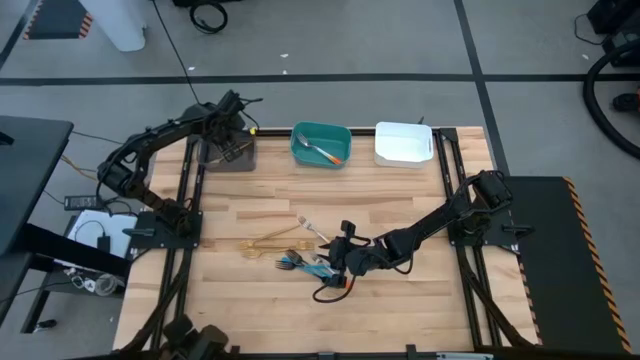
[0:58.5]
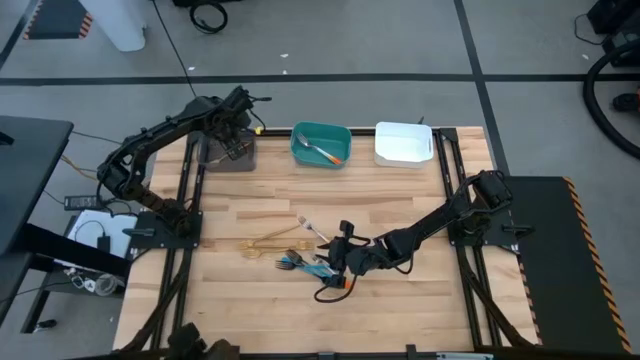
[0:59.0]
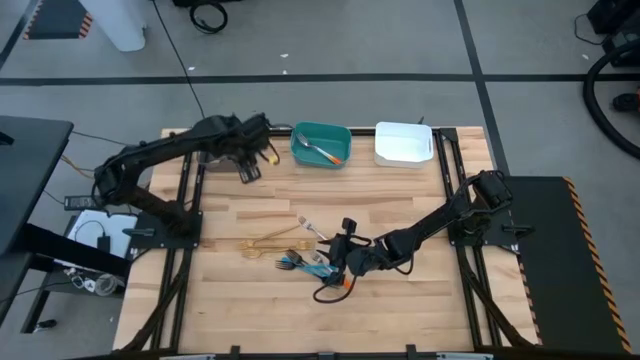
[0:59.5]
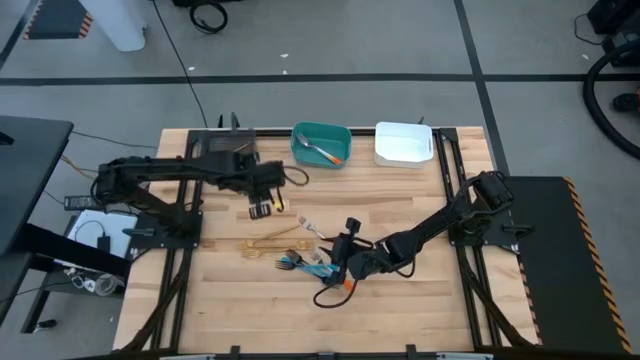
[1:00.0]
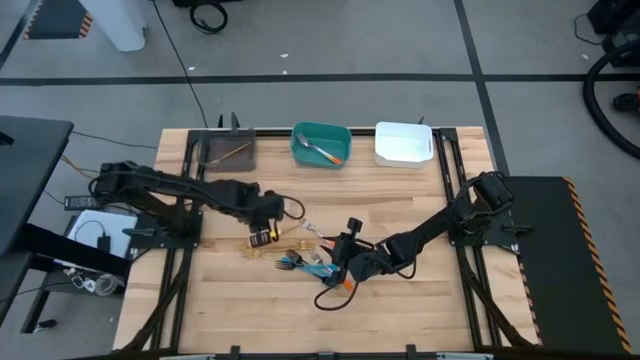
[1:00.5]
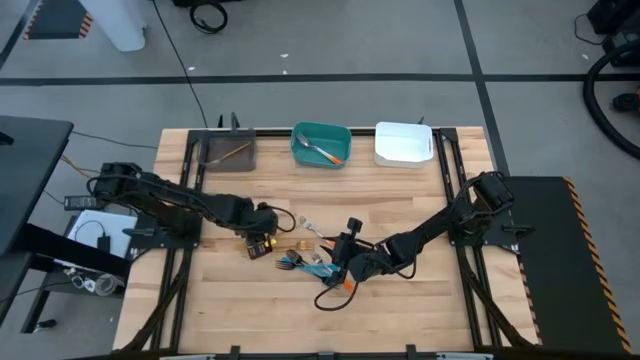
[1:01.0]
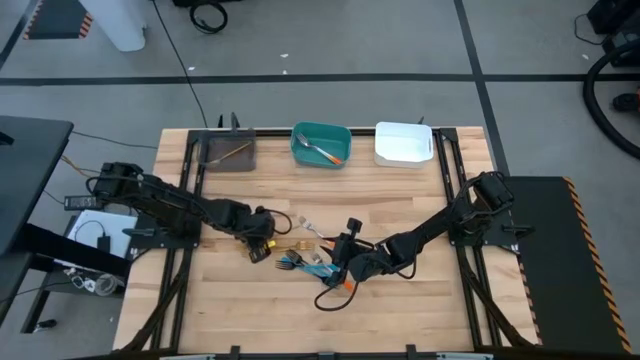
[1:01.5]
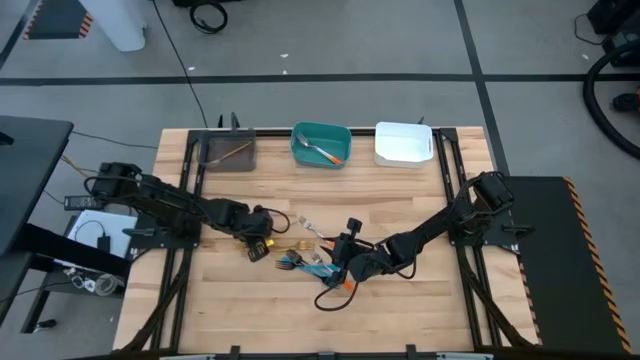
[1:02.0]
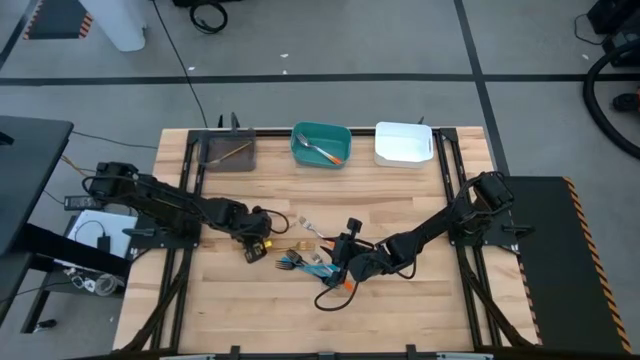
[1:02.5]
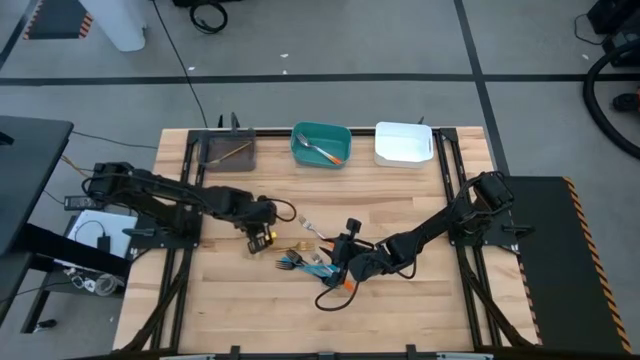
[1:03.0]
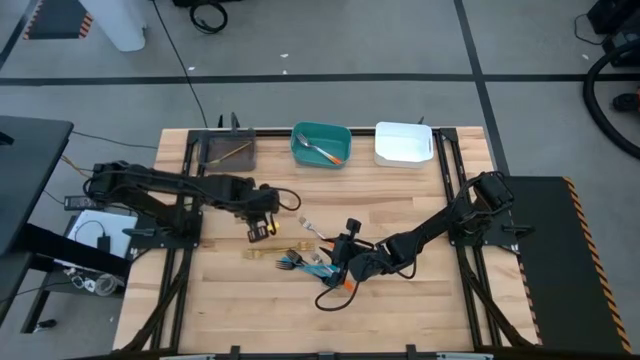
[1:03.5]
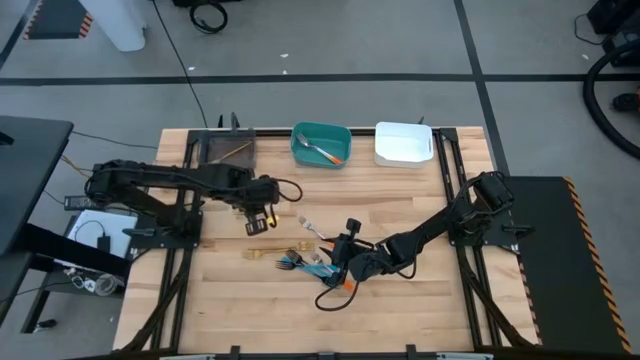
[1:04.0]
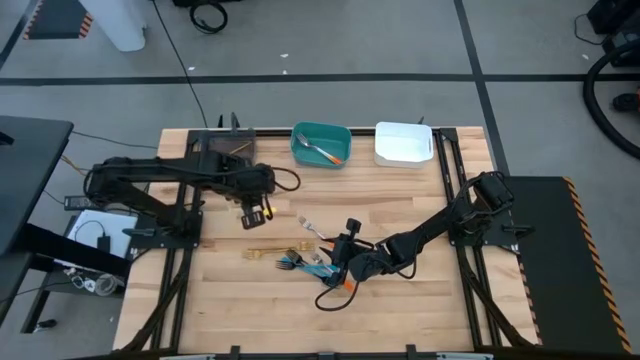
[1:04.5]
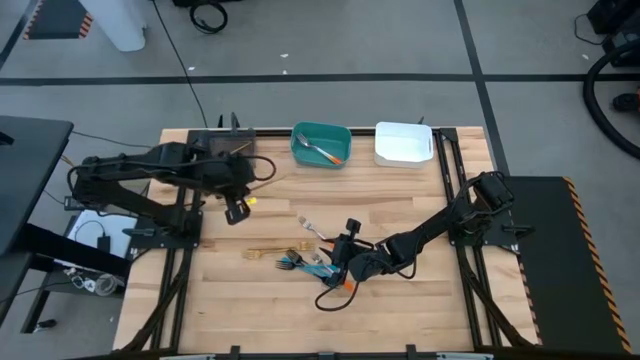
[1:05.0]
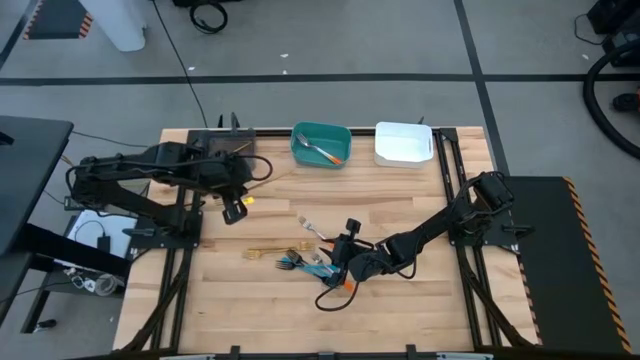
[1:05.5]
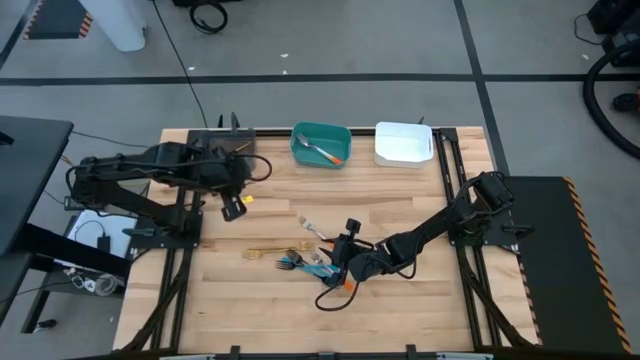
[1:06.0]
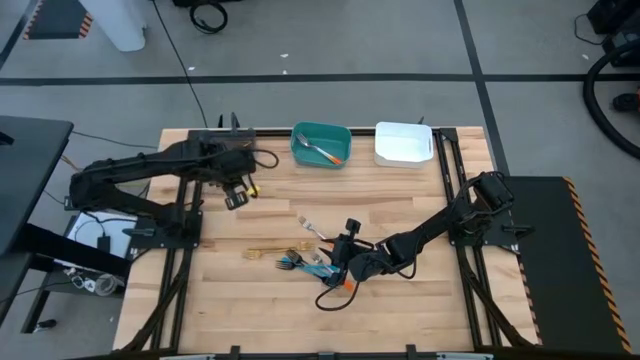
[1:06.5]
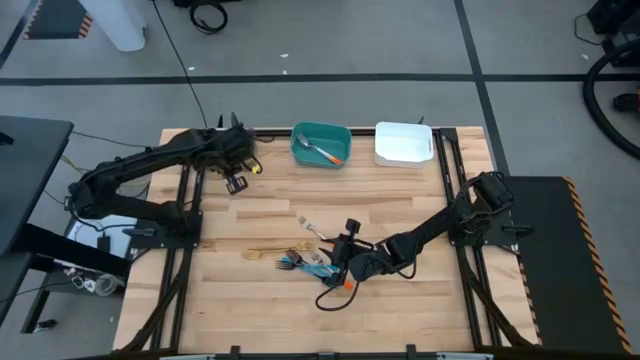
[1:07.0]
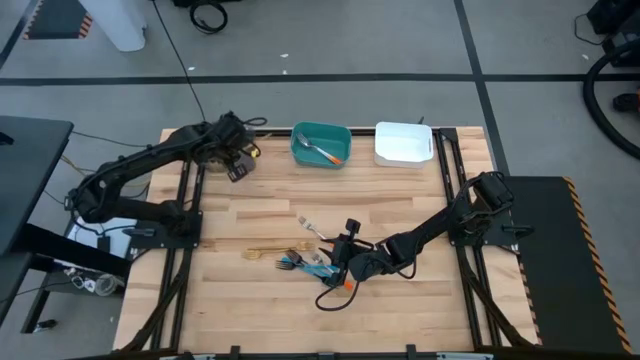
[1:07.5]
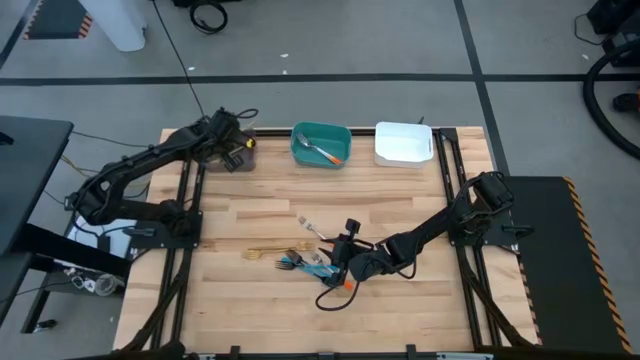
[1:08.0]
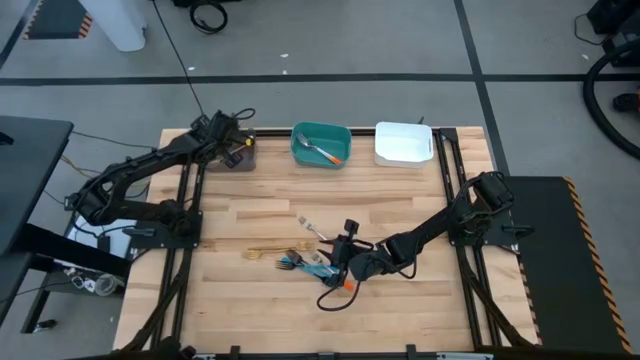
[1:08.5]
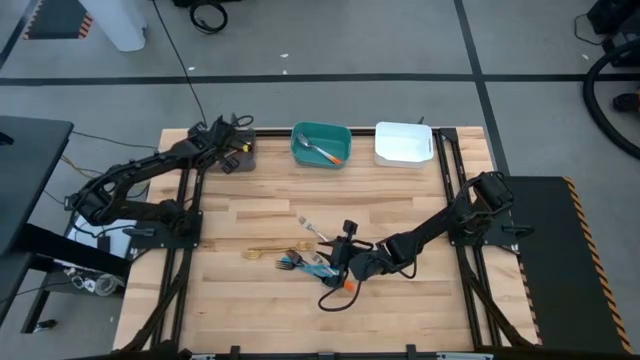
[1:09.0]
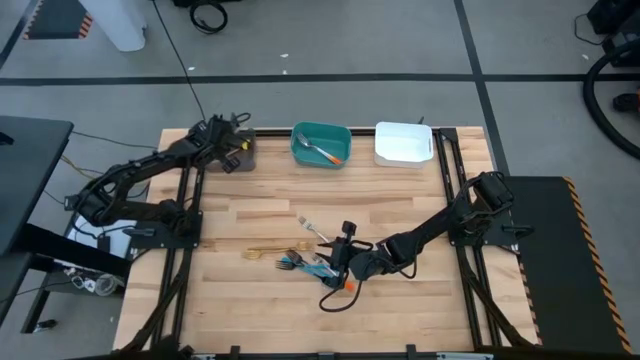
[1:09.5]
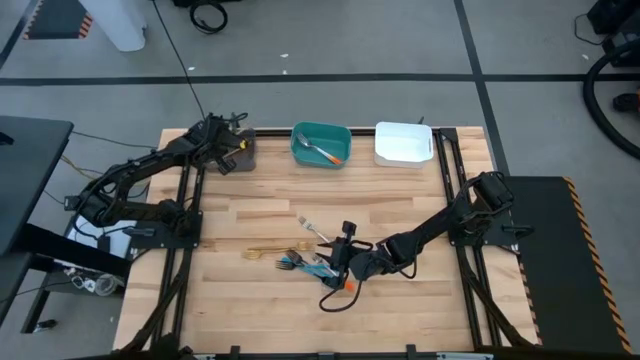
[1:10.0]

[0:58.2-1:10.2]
Task: Sort silverware by color (type)
Put the gold fork into the black bin

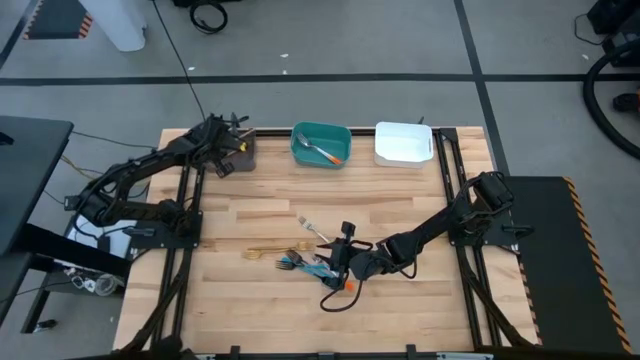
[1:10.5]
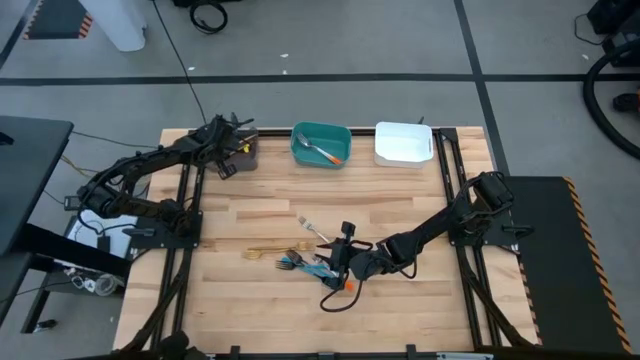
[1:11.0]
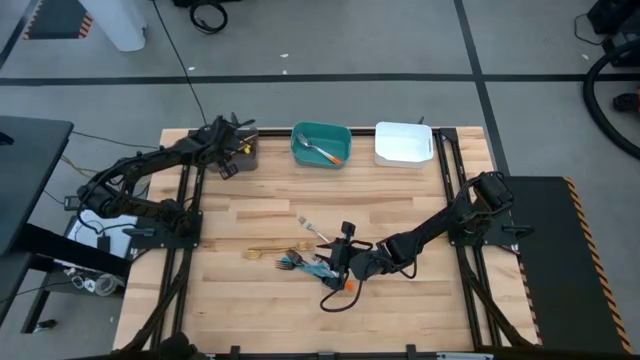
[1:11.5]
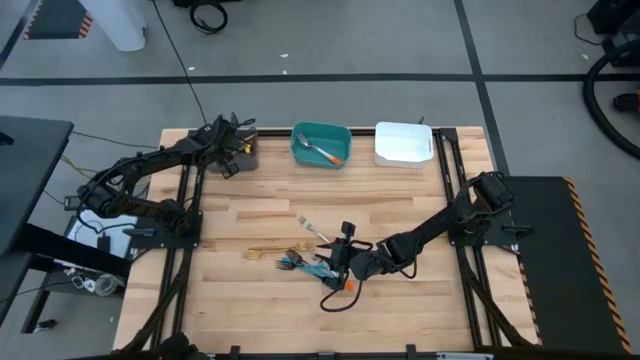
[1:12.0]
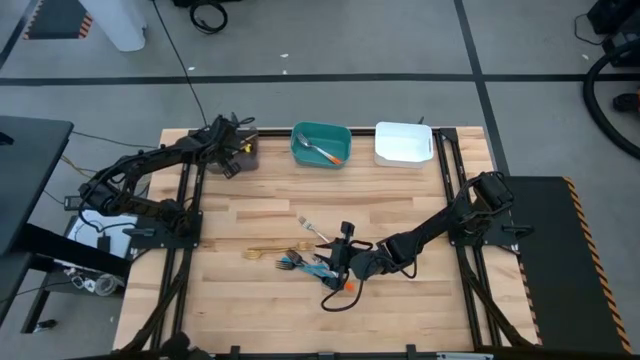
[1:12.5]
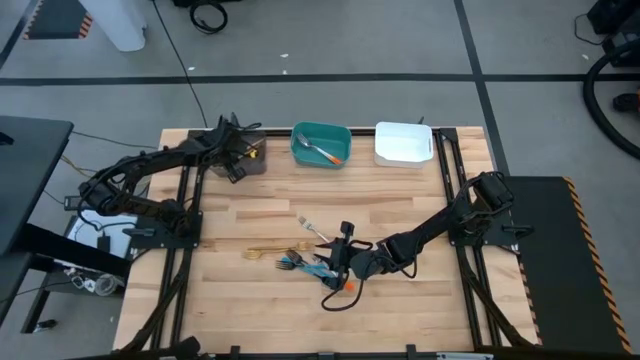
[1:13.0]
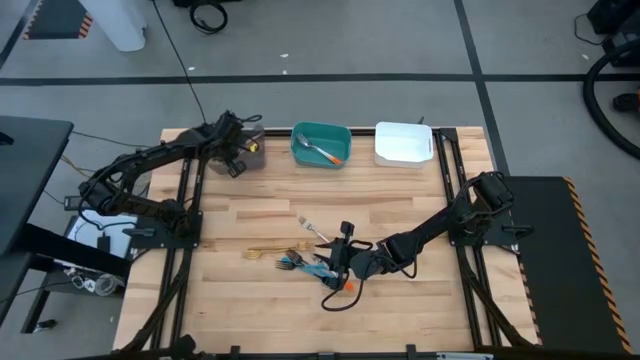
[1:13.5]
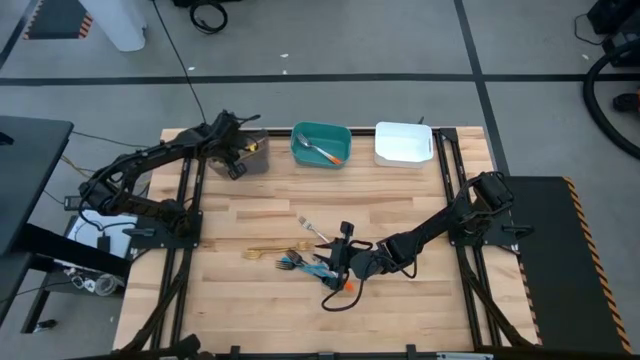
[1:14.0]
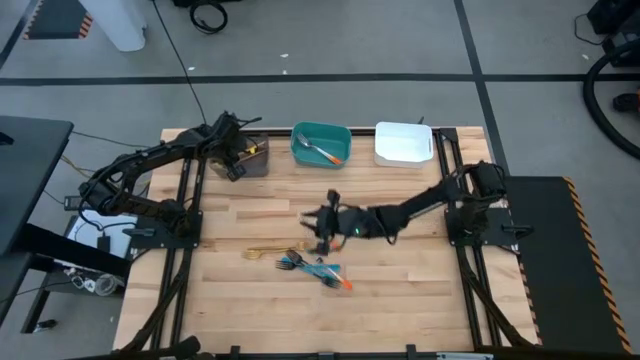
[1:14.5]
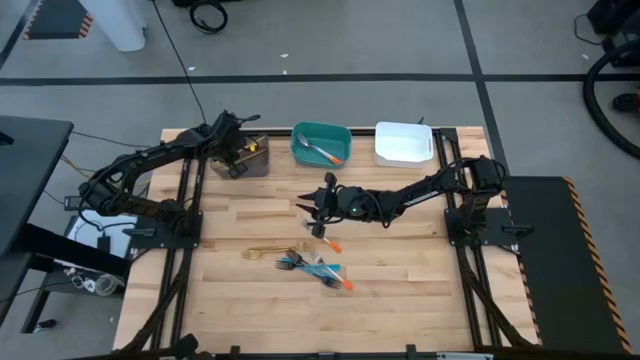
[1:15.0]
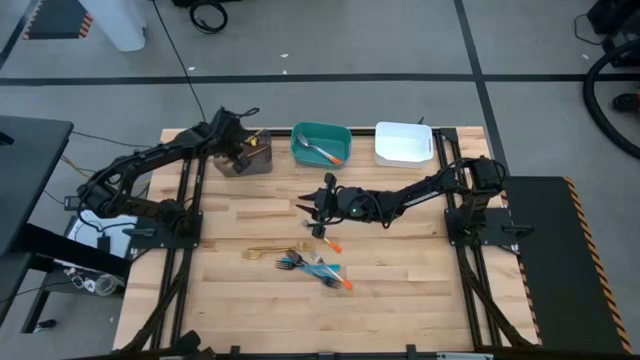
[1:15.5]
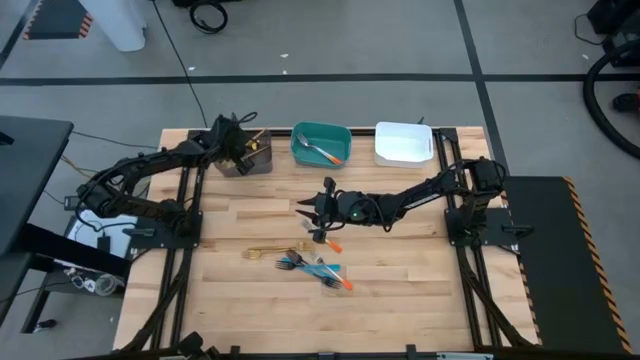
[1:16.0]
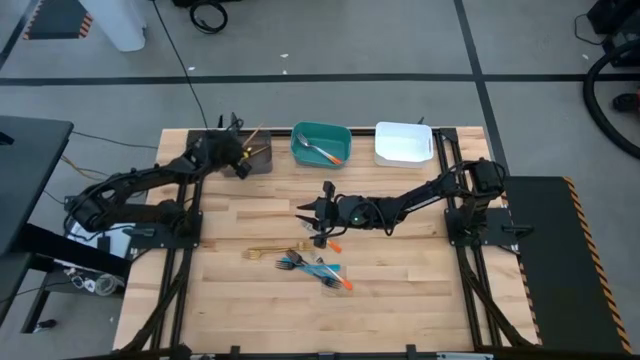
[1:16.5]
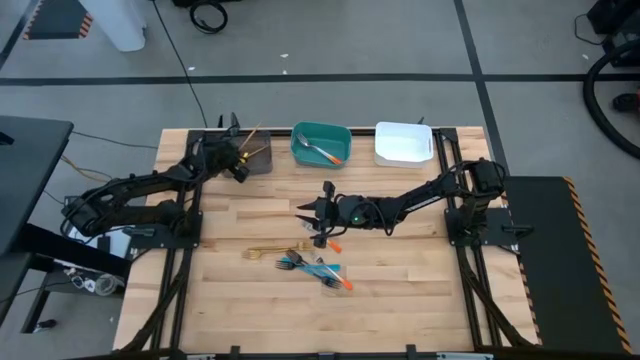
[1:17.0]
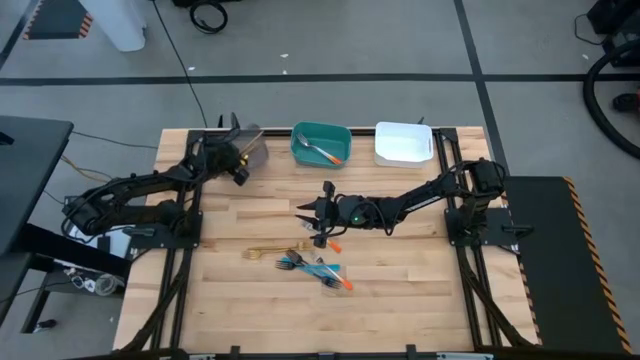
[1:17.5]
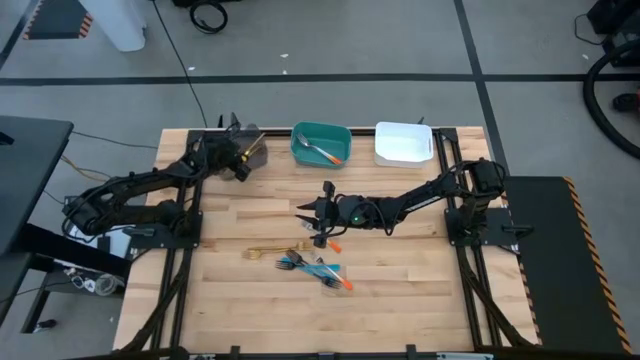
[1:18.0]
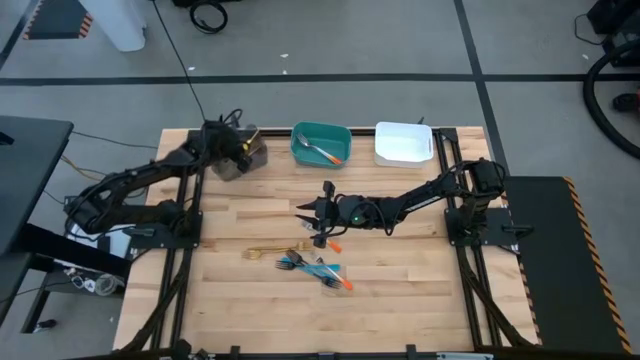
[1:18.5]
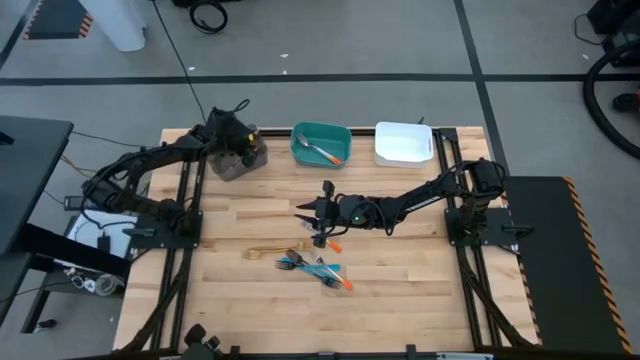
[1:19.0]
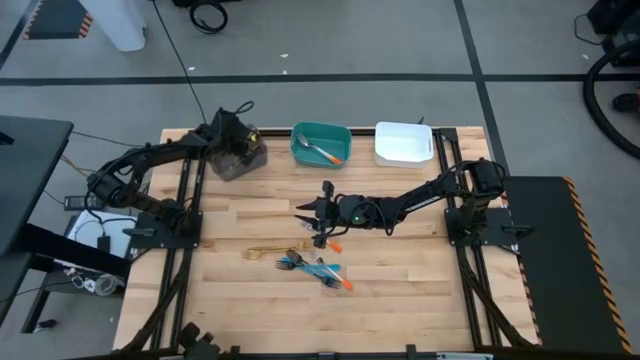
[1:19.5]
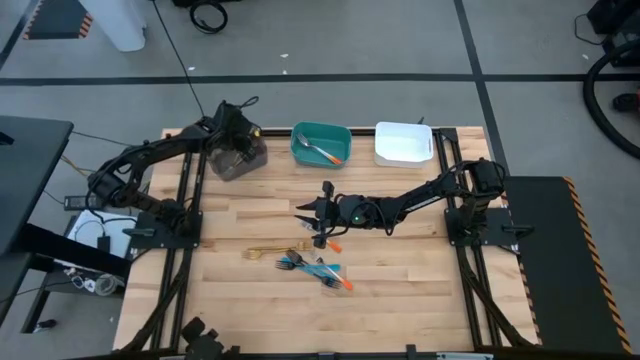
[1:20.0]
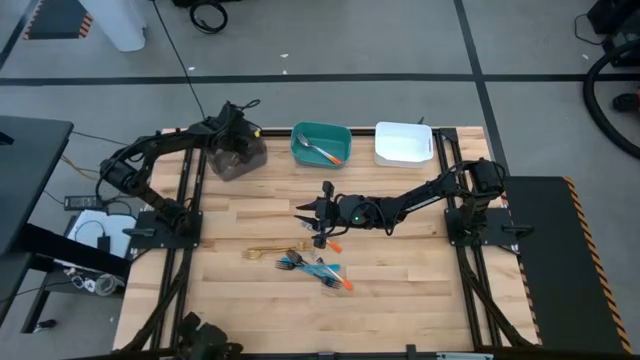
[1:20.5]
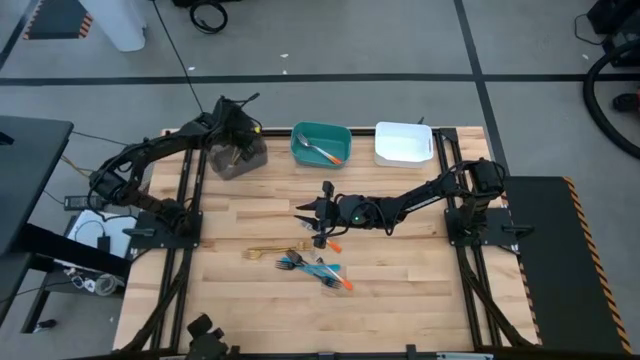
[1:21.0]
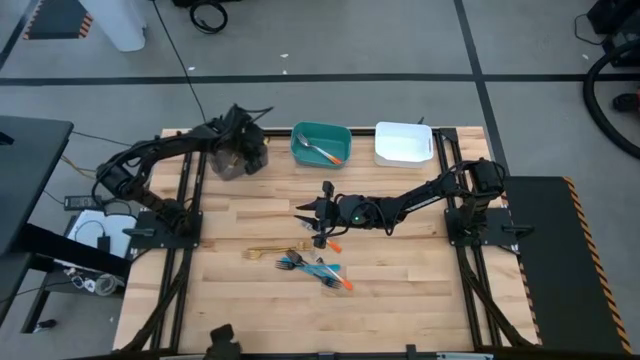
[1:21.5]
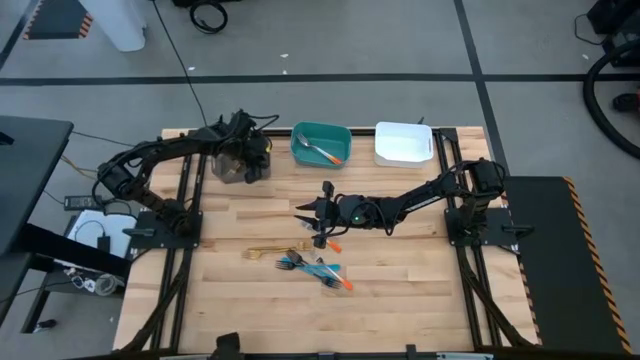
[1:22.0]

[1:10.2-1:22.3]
Put the gold fork into the black bin
